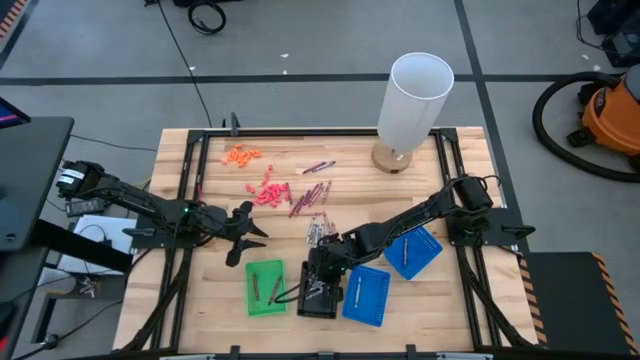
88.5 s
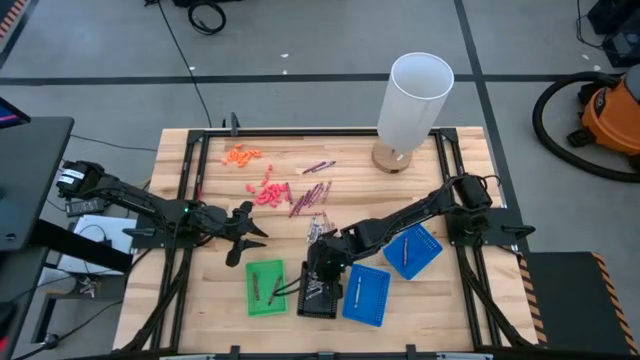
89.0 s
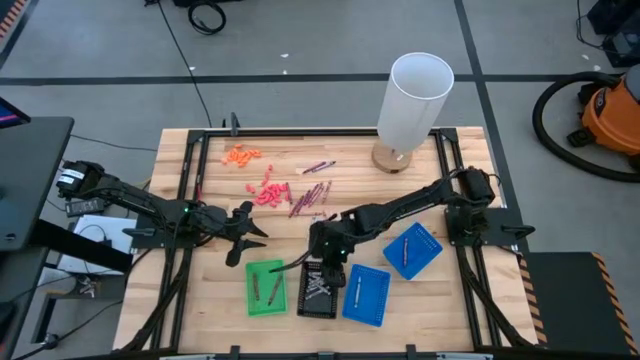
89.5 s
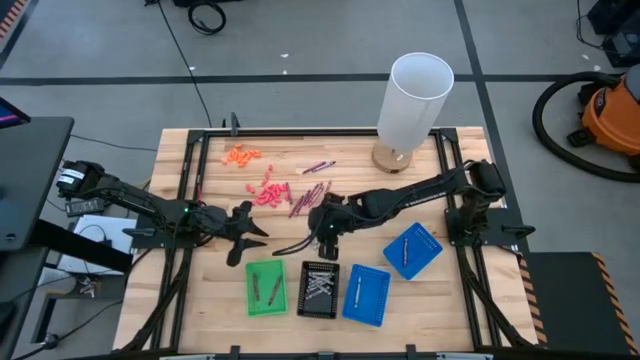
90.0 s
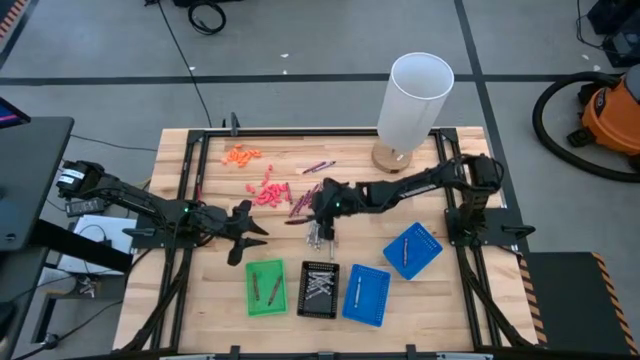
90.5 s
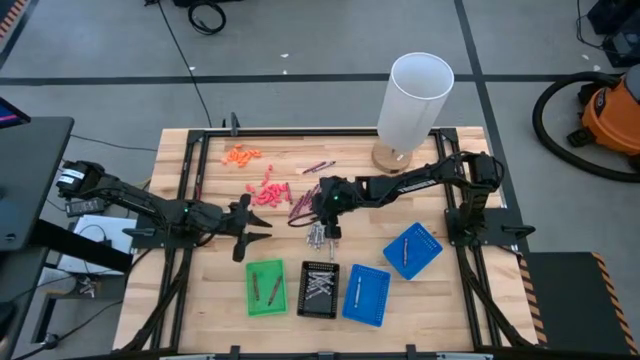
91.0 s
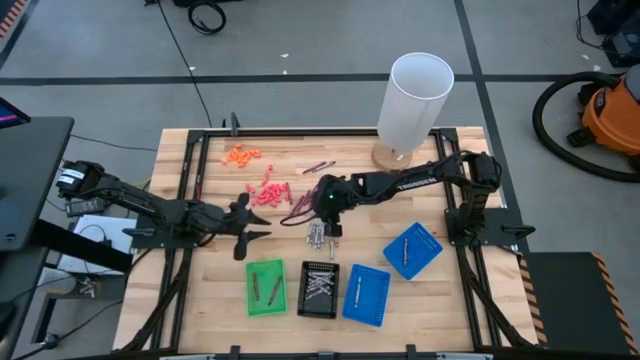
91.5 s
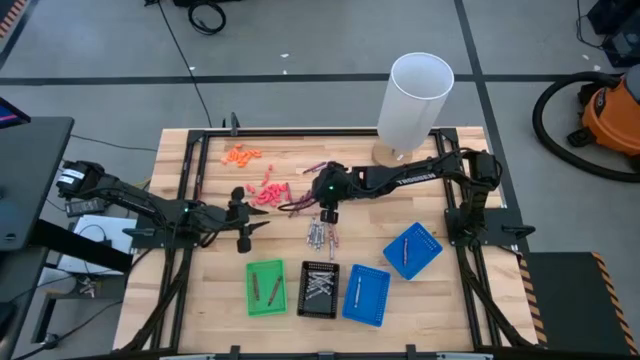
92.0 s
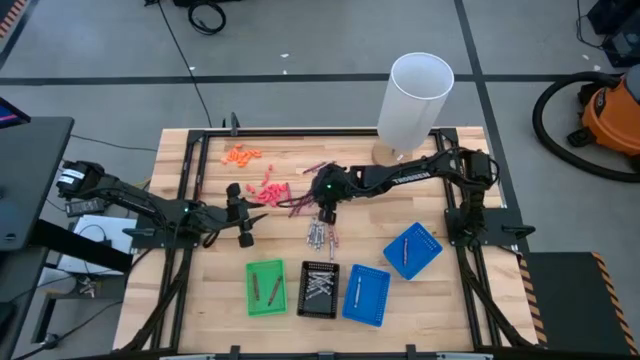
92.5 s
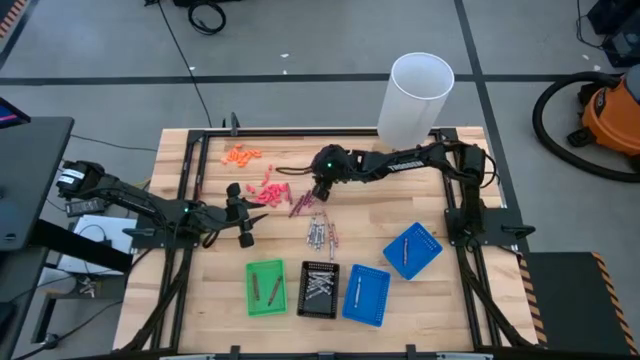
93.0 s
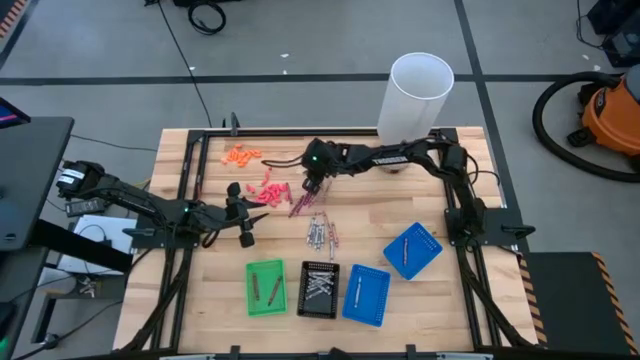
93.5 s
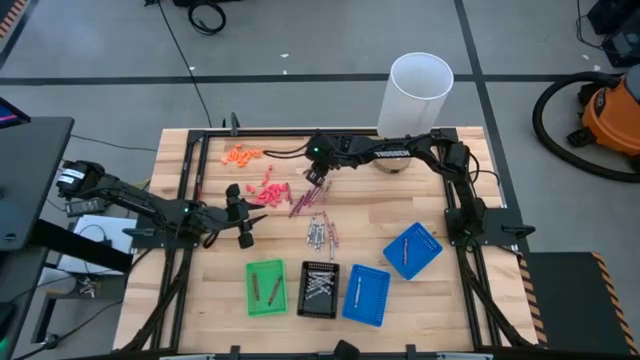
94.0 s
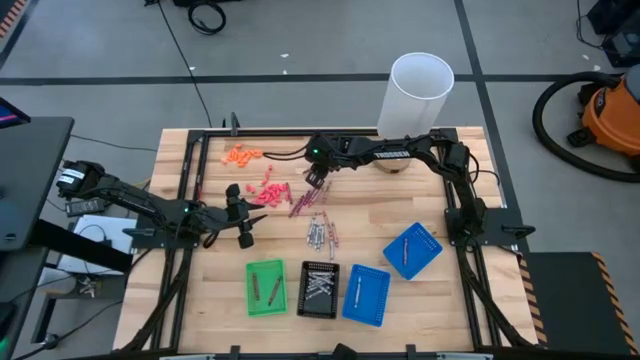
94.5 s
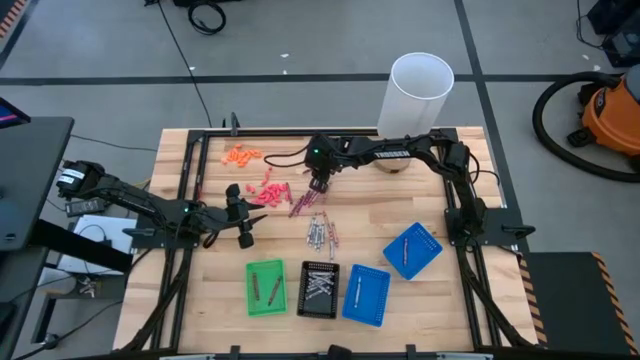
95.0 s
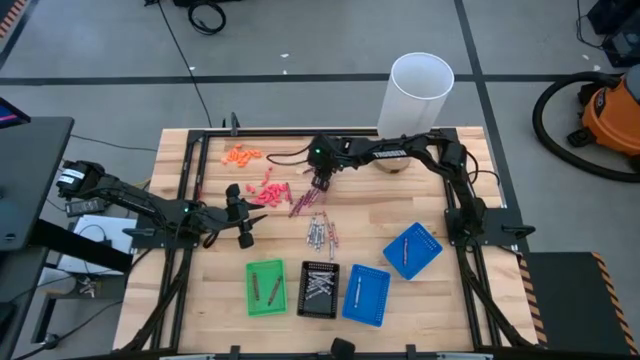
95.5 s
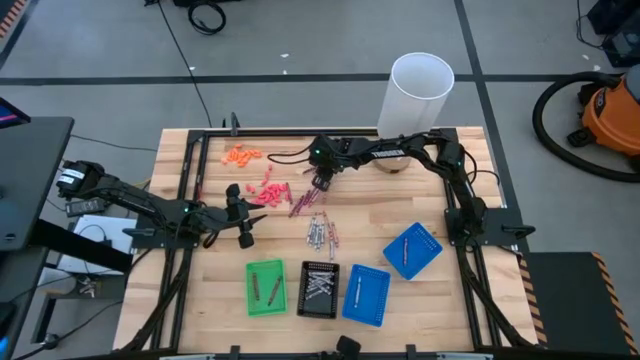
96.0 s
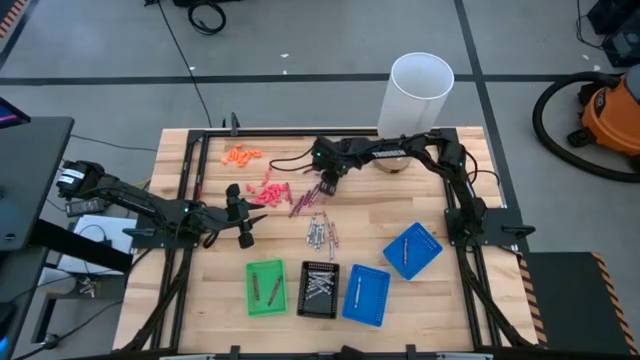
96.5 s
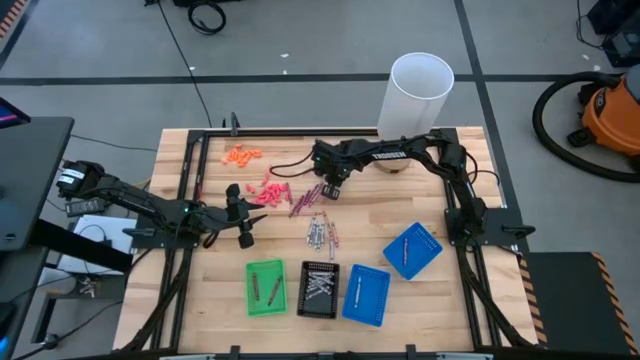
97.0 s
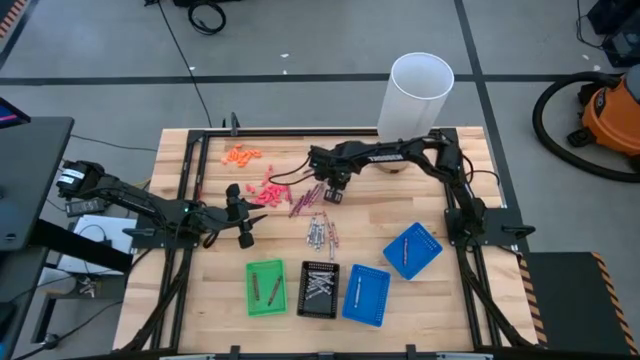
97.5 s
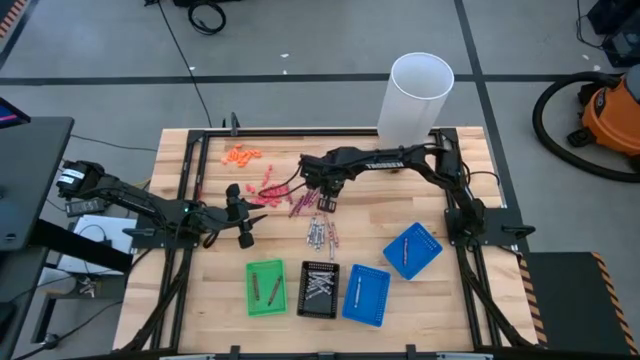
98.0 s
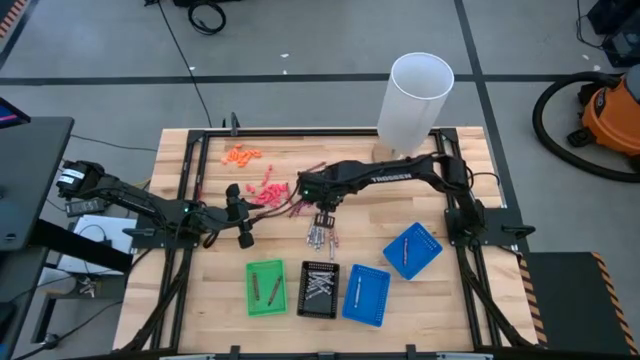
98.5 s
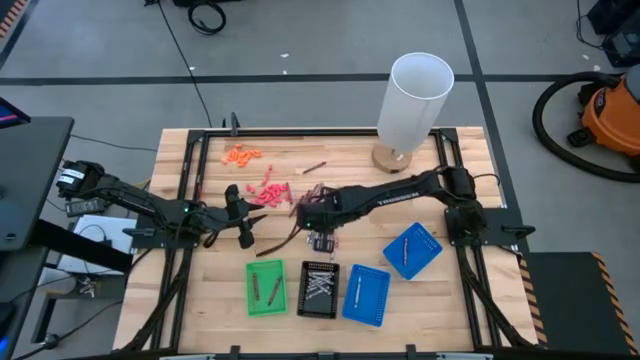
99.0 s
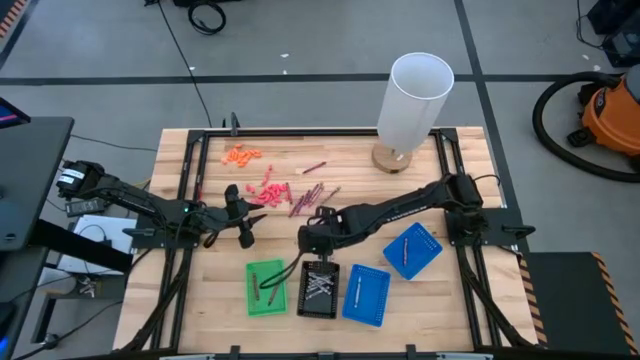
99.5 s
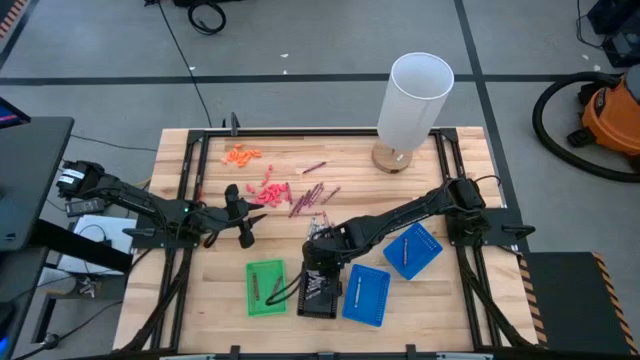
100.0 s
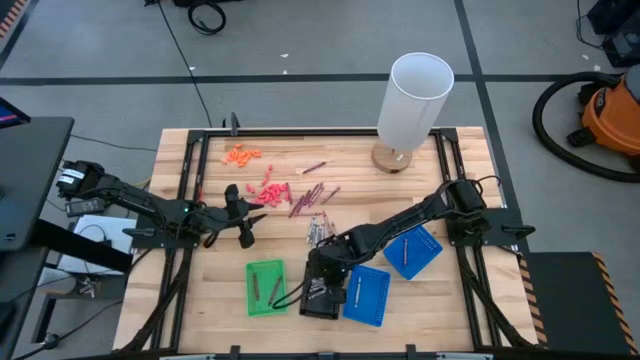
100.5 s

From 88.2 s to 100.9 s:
Task: Sort crayons
Put the black crayon into the black basket

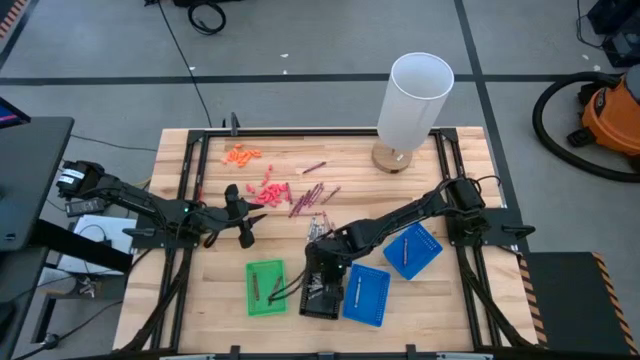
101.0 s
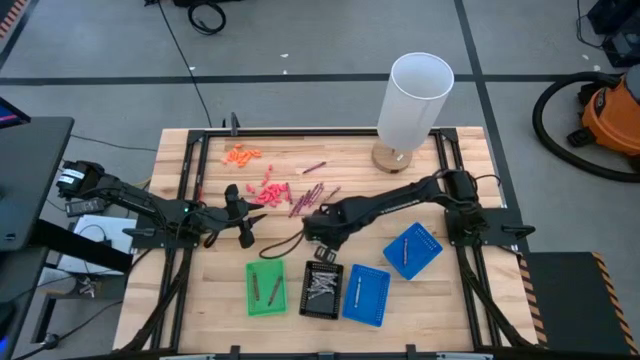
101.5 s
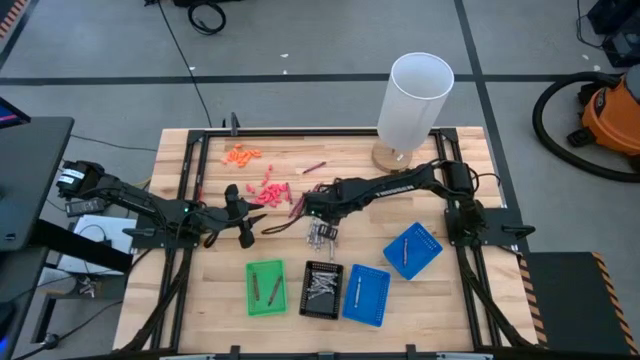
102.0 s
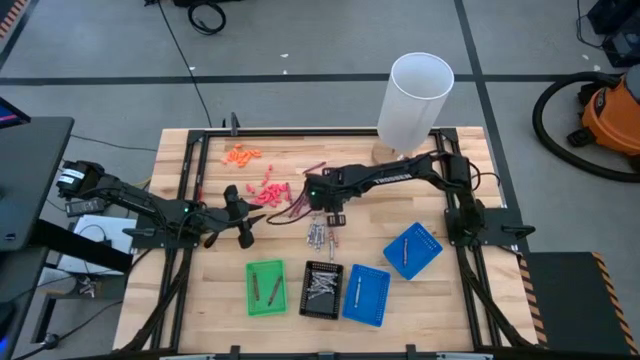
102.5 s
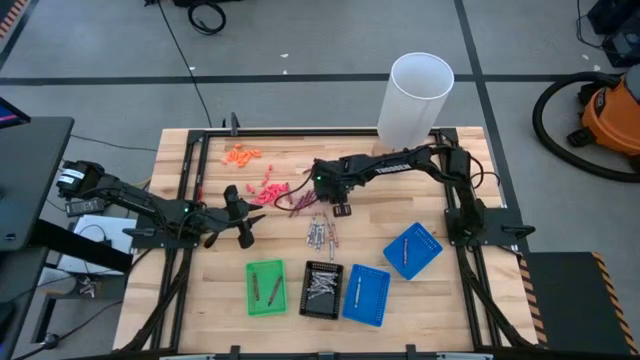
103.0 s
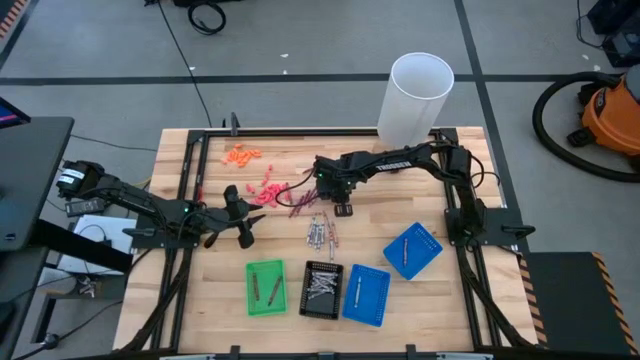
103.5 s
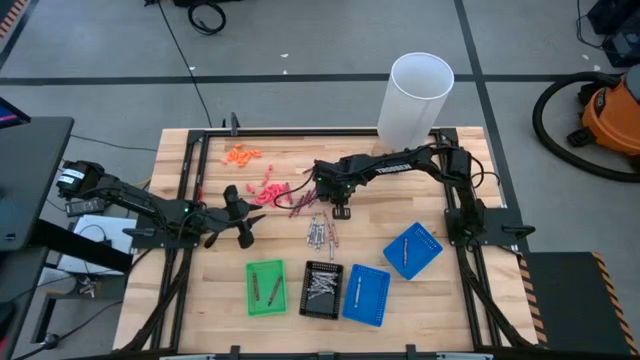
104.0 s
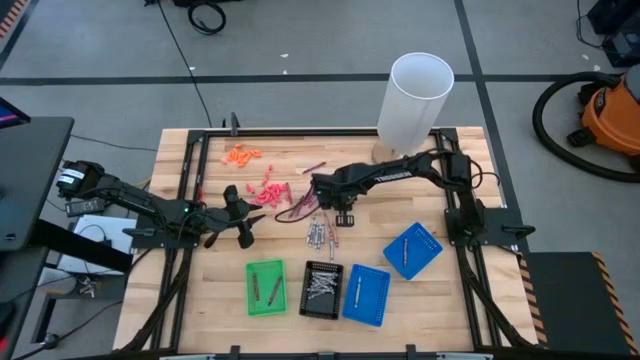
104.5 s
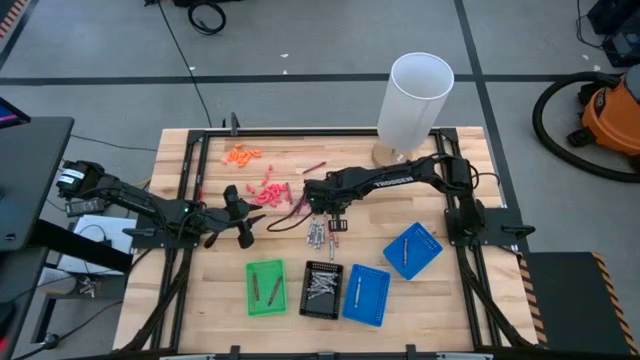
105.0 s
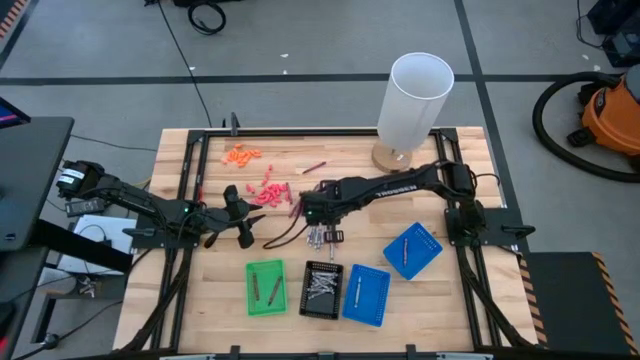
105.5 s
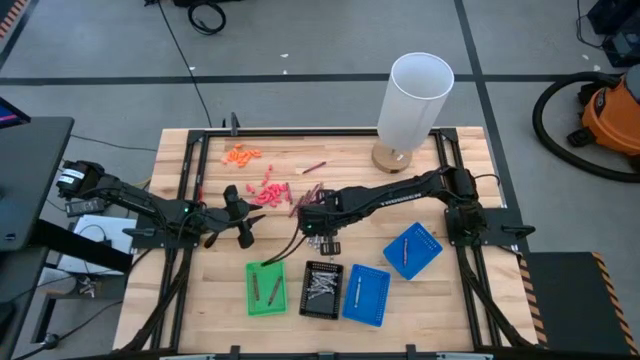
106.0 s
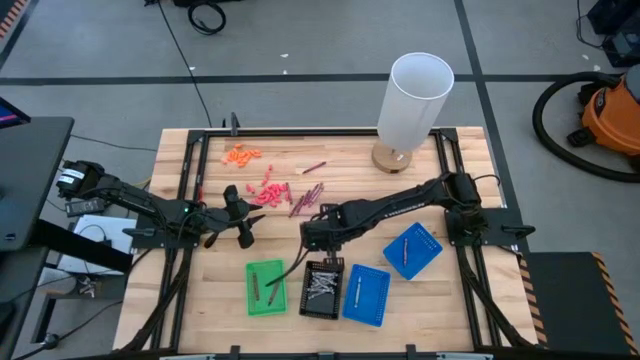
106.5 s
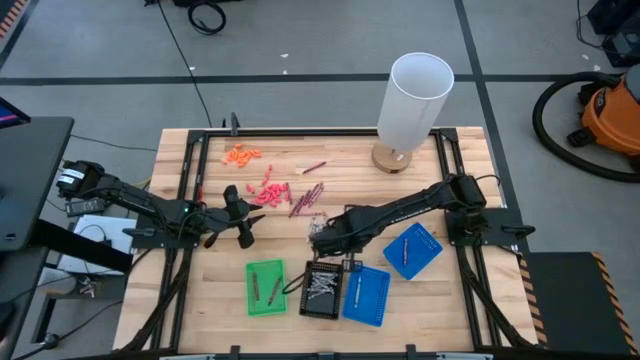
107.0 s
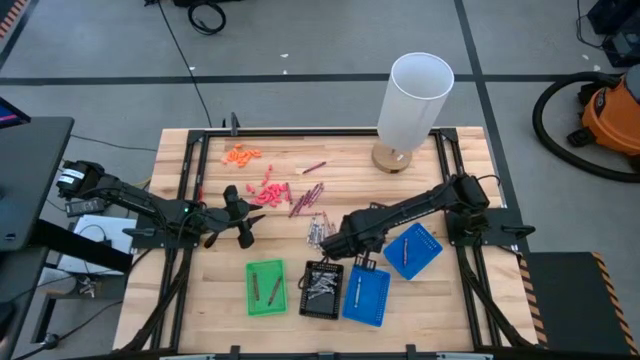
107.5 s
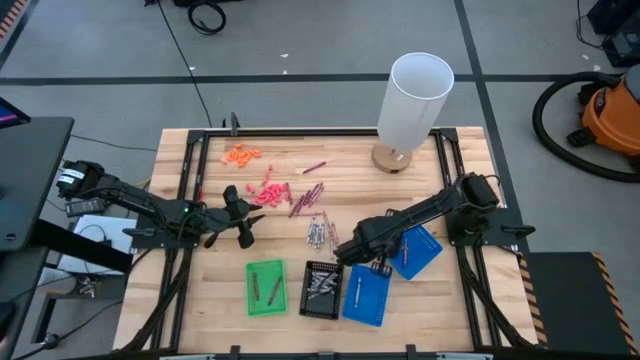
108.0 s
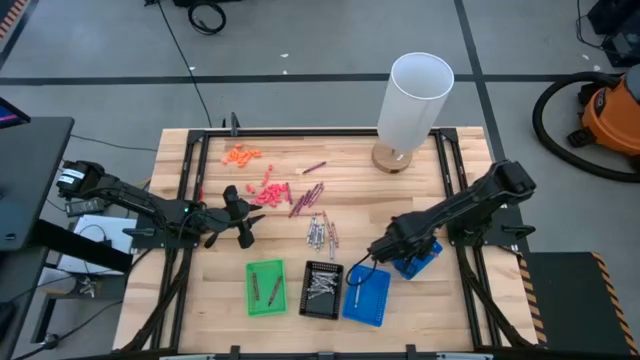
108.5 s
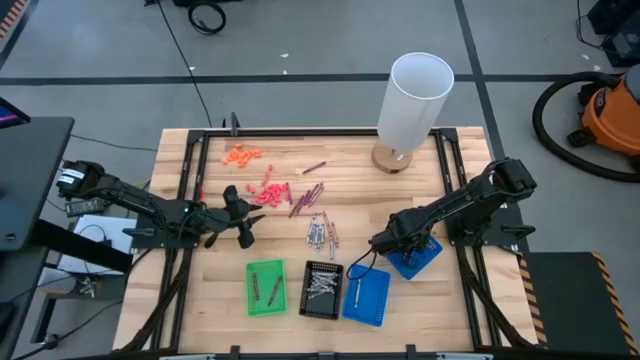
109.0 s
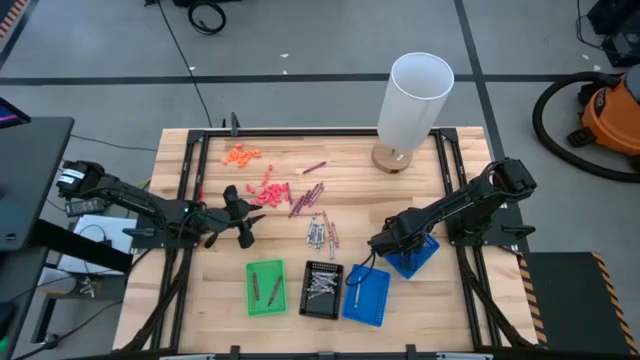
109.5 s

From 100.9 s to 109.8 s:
Put the pink crayon into the right blue basket

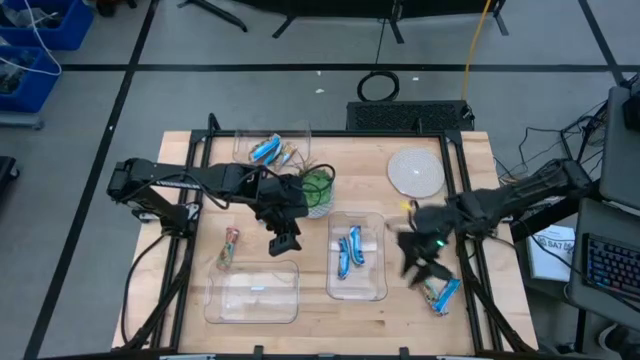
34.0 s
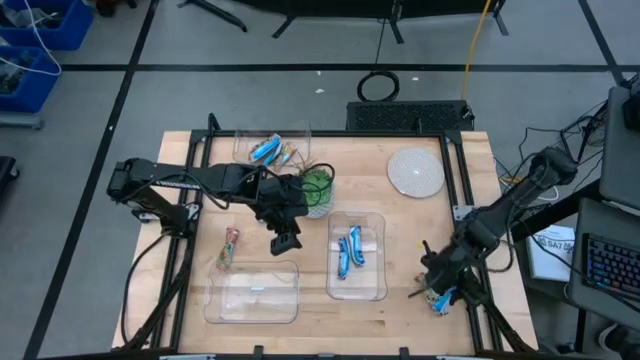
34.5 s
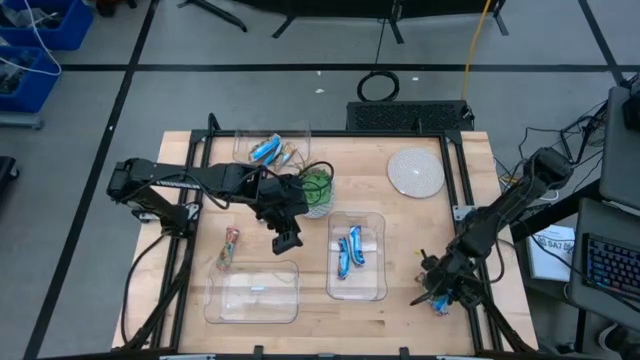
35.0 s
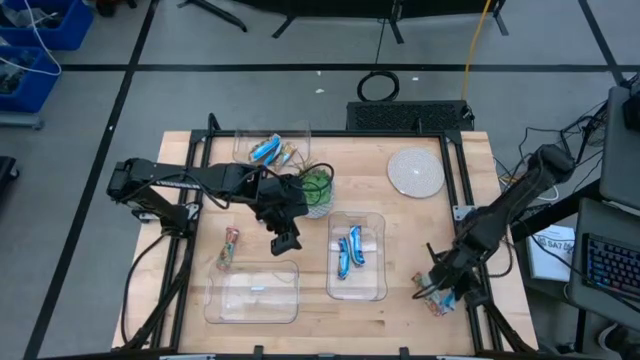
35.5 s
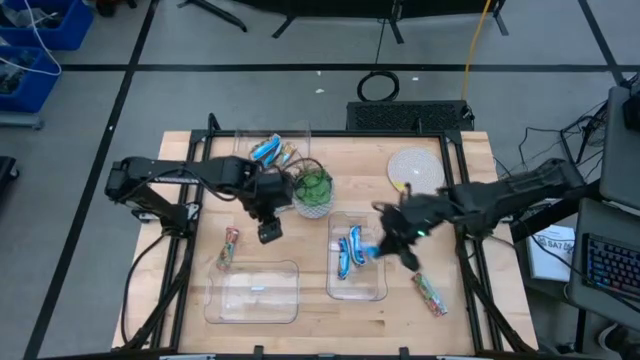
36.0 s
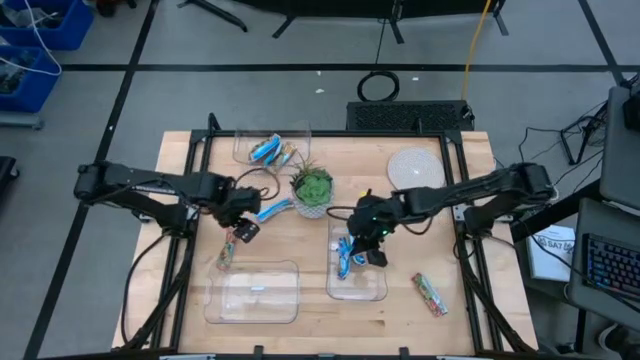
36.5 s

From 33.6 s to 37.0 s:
Task: Pick and place Granola Bars by type
Put the blue granola bar into the middle transparent bin
